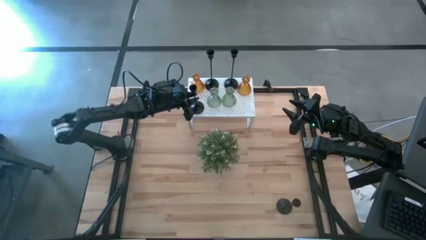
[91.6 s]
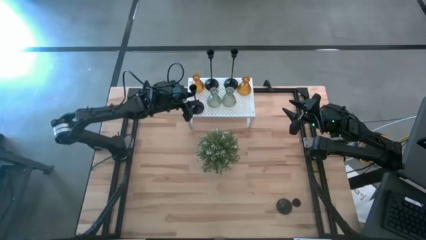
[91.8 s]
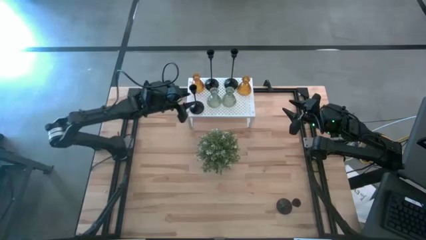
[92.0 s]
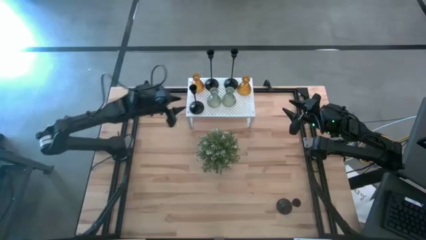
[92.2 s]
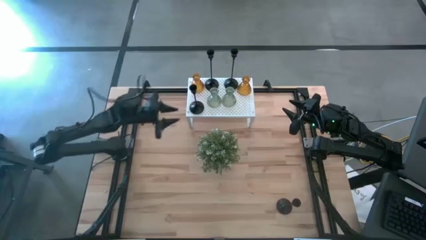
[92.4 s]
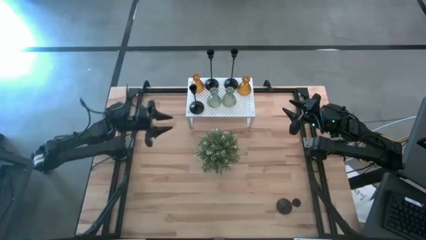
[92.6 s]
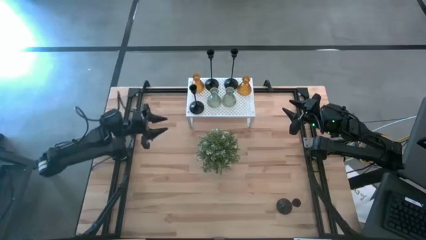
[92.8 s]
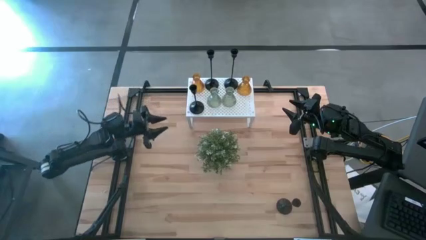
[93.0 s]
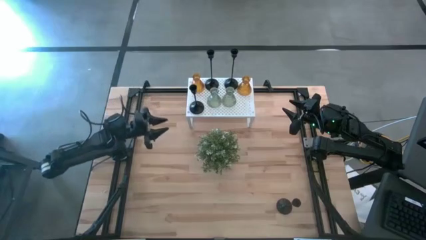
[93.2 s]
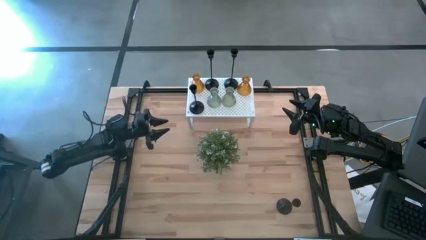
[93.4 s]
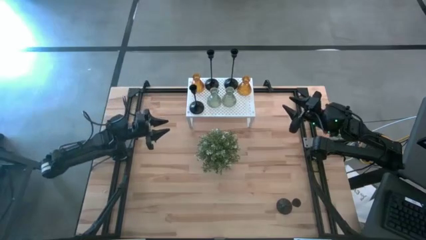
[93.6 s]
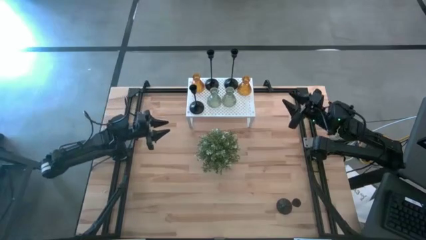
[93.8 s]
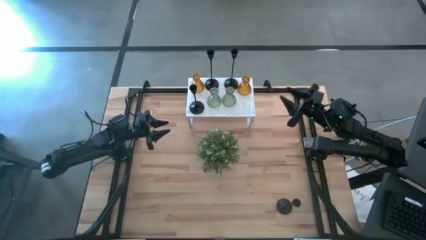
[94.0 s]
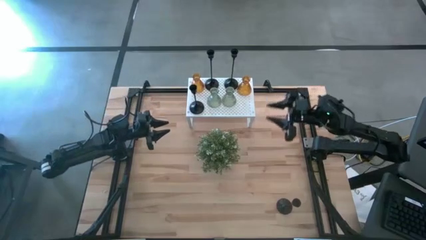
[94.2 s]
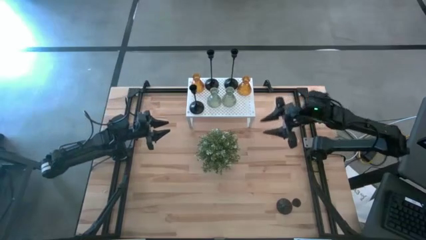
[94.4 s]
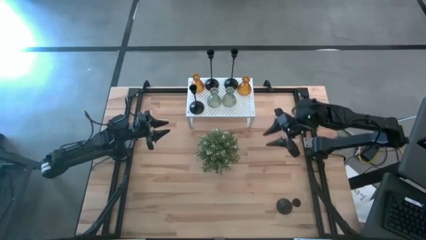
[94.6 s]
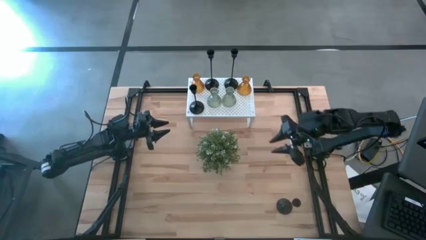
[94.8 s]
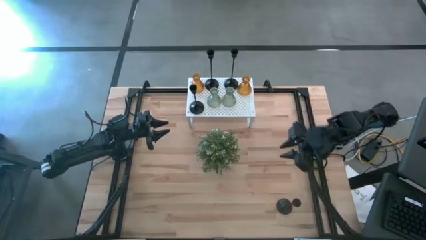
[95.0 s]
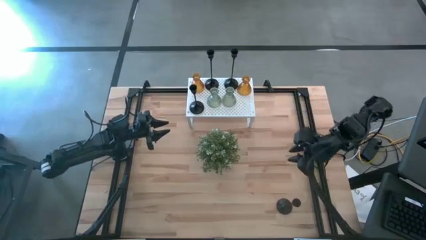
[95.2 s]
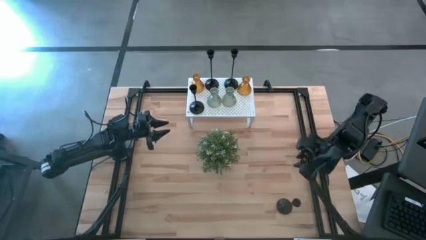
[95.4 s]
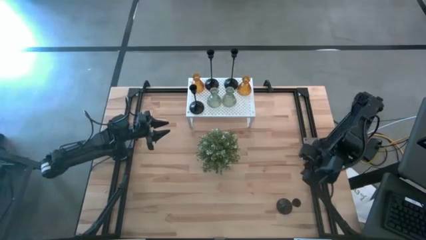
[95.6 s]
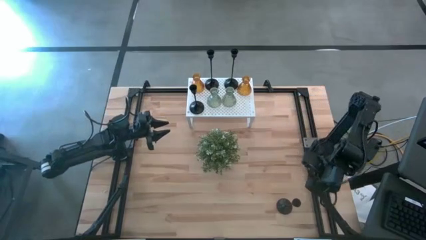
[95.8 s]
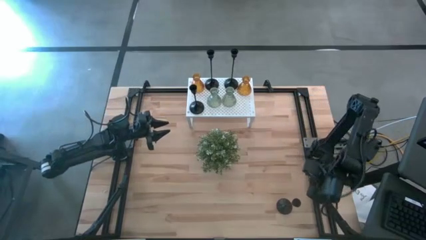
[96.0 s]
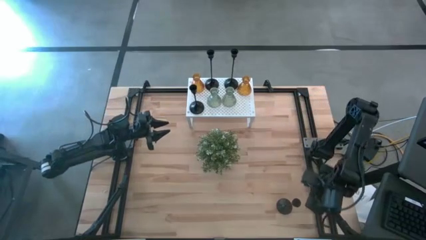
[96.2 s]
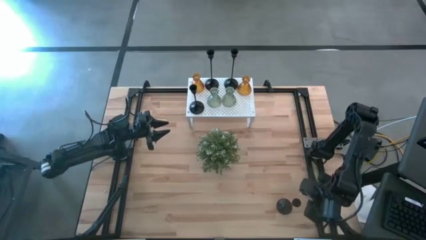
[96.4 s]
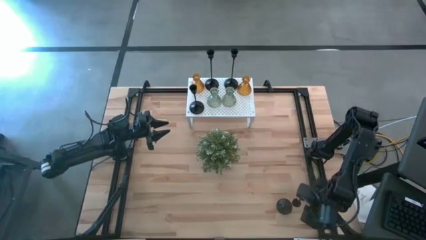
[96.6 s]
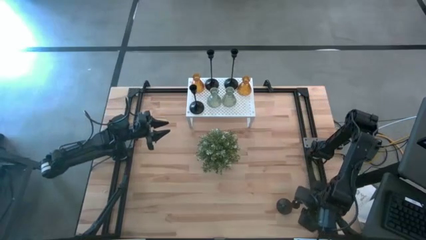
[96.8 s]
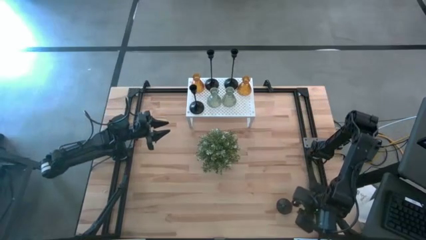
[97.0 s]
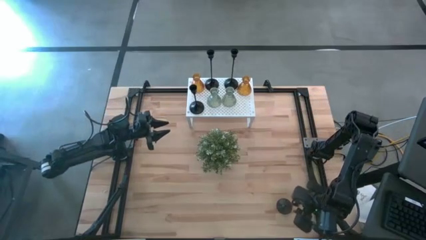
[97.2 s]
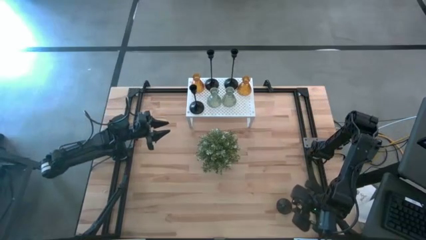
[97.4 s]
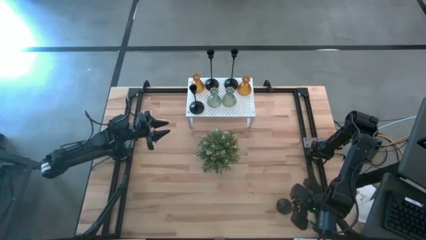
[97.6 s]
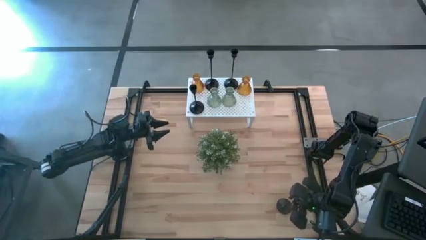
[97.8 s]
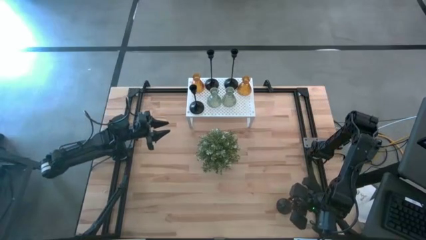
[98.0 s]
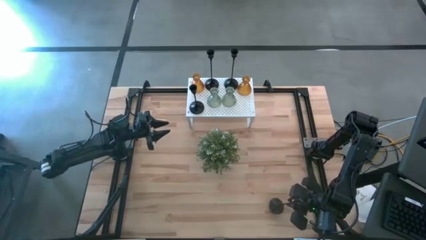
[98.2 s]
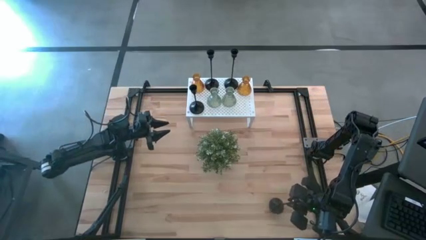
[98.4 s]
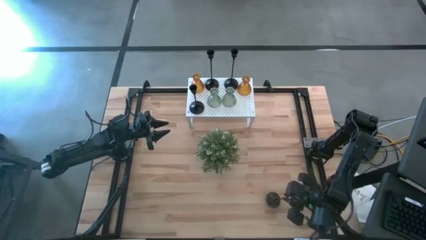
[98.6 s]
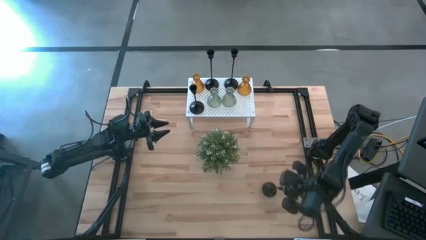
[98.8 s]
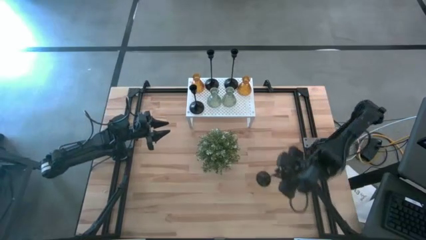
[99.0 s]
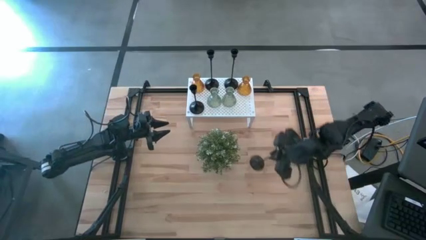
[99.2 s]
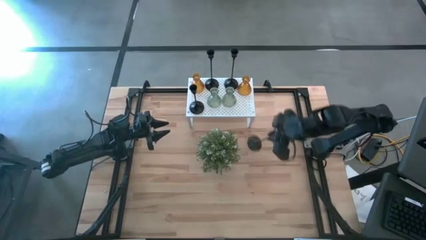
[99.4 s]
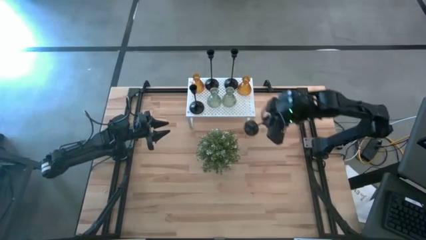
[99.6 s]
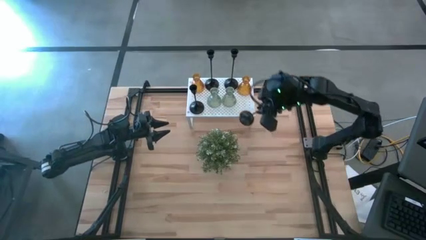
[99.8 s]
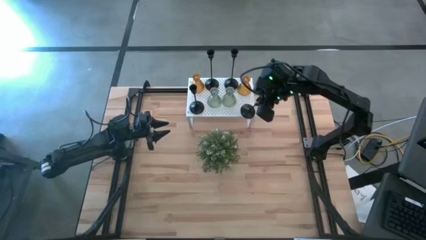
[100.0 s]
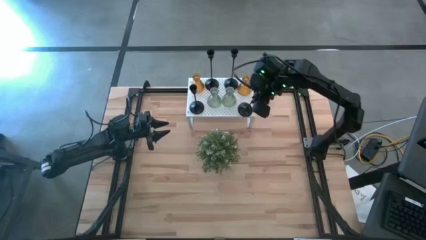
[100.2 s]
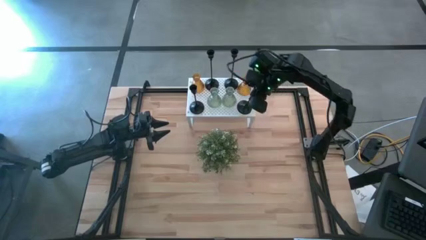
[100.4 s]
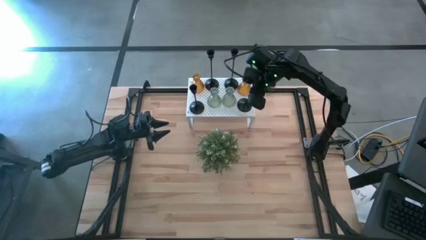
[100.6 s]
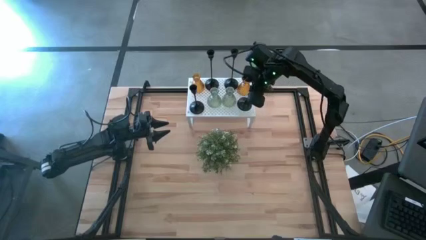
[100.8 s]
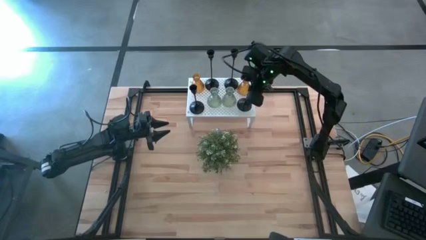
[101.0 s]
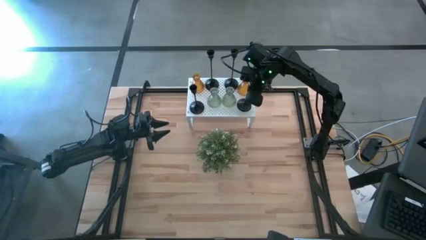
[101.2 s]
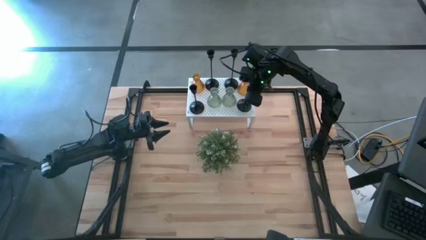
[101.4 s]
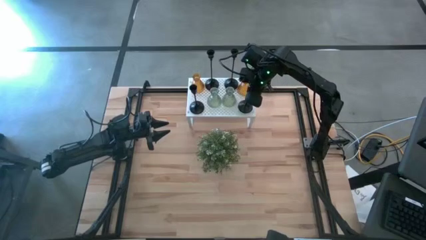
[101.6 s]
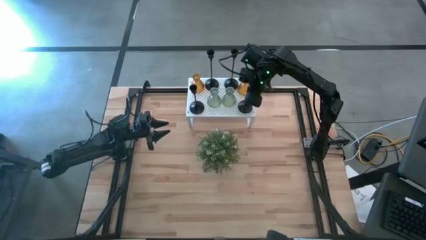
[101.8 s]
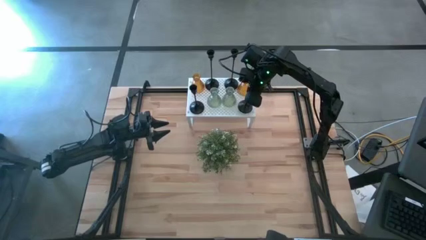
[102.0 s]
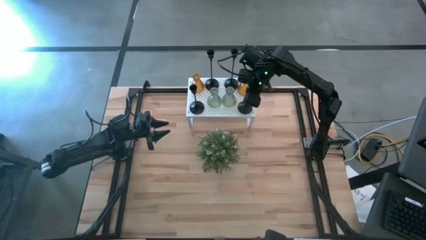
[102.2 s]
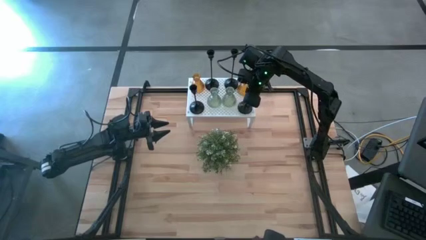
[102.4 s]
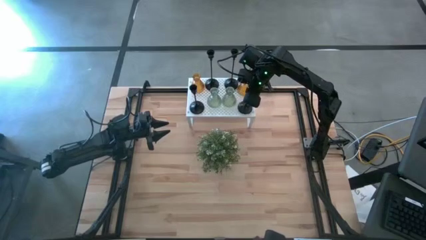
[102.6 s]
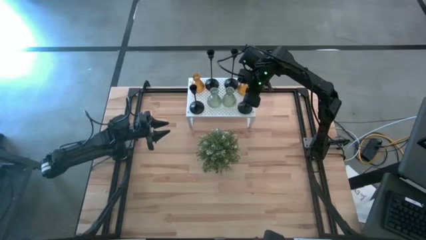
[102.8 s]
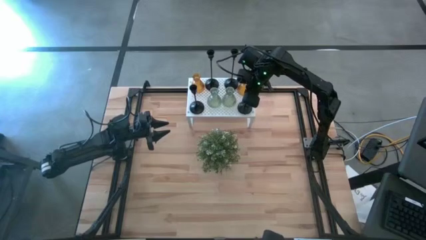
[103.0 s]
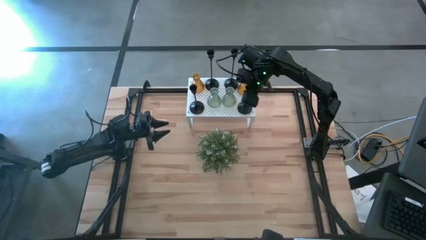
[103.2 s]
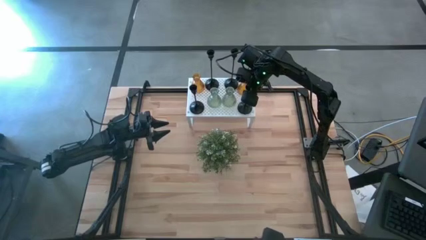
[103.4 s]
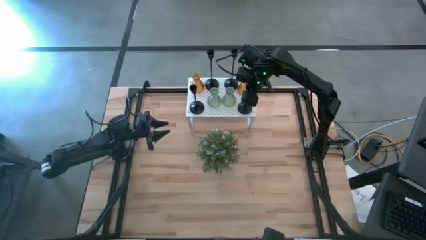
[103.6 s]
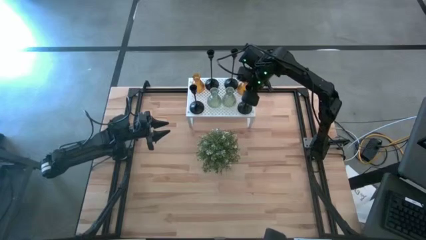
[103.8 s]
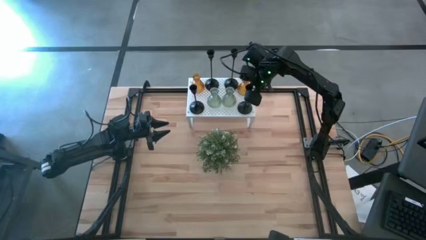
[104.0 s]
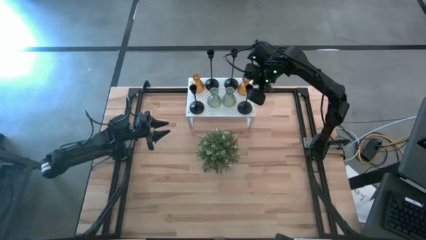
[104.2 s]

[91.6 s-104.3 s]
Task: Pick & Place candle stick holders
Put the small black candle holder on the shelf

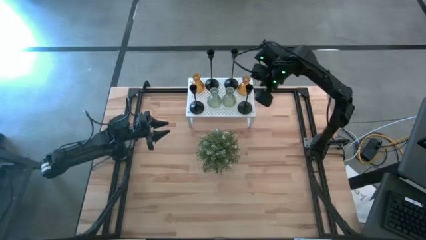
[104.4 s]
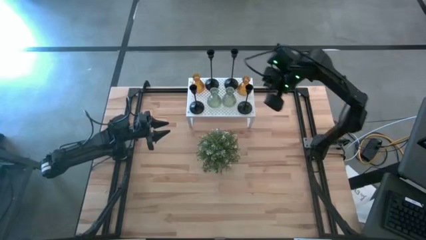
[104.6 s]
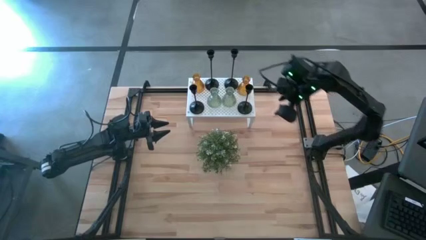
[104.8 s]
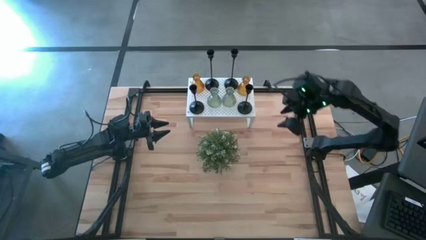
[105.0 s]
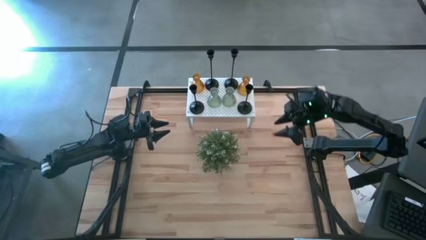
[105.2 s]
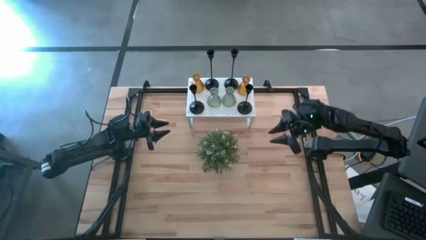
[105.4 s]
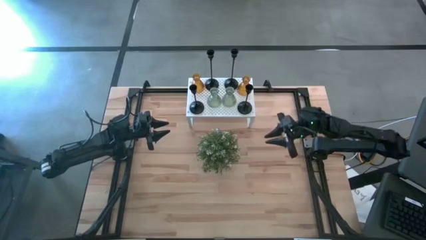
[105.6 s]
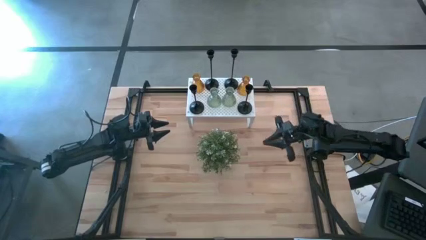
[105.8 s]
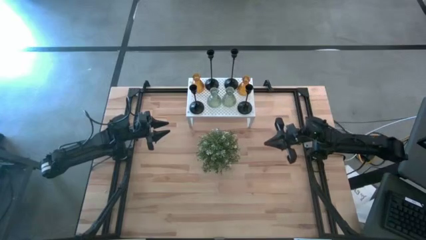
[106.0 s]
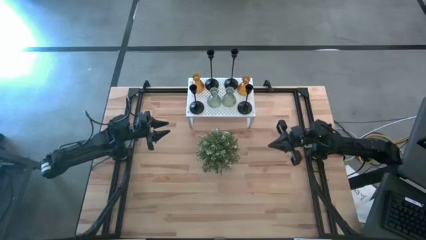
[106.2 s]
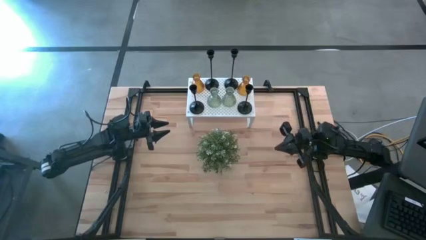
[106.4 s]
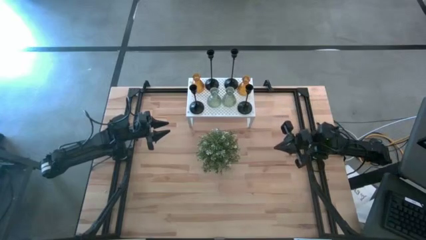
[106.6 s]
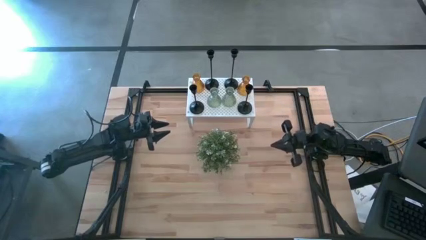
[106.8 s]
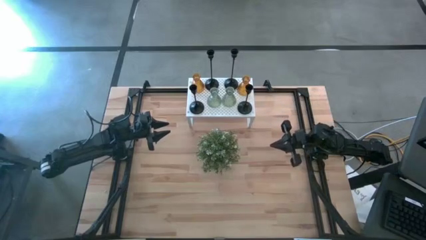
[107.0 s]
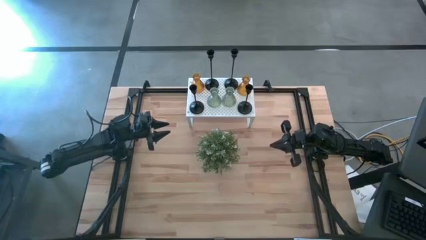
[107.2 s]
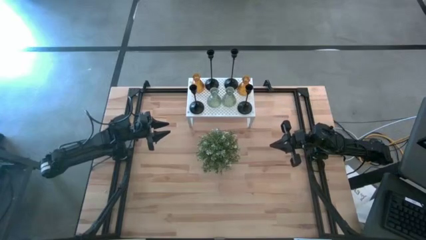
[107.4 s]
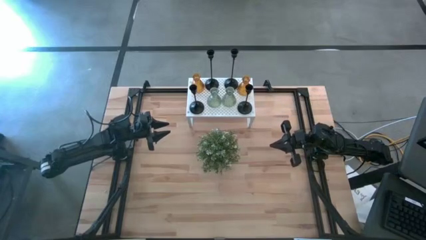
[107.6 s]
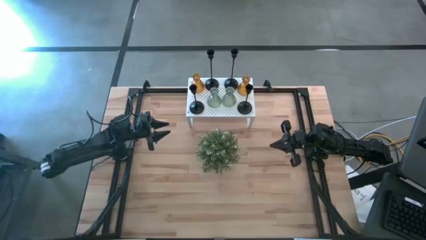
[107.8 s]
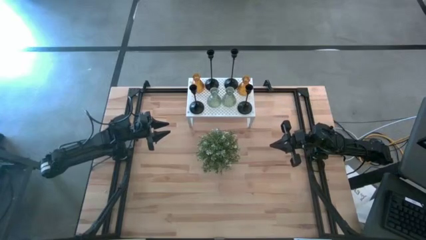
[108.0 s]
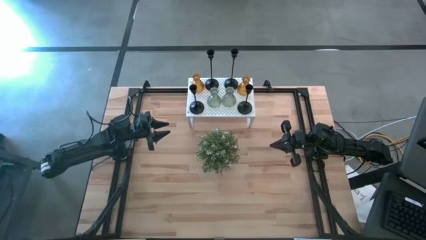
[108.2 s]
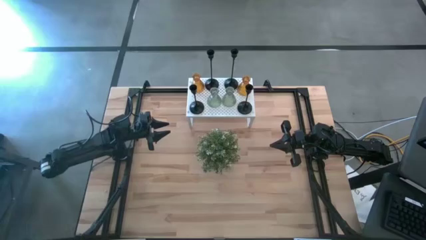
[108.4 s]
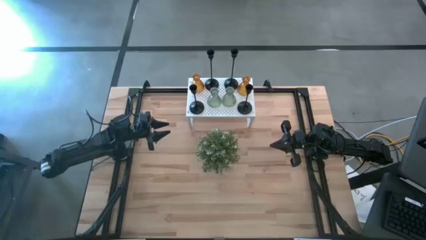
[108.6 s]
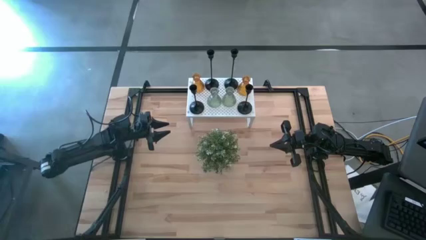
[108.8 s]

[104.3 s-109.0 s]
Return to Home Position
